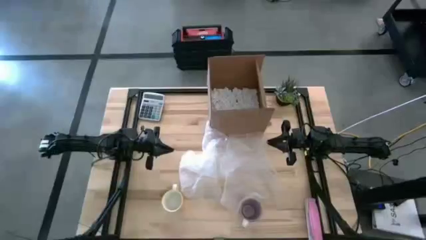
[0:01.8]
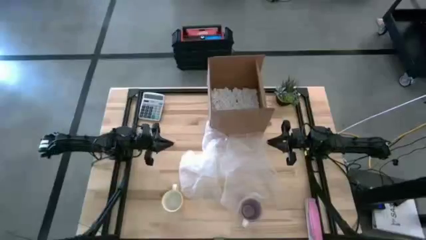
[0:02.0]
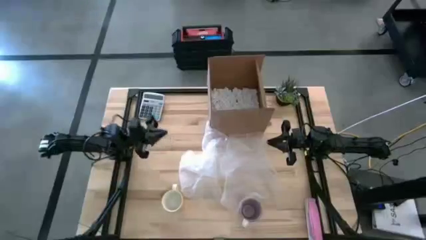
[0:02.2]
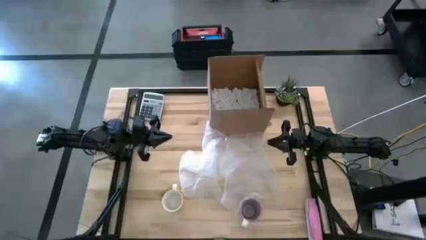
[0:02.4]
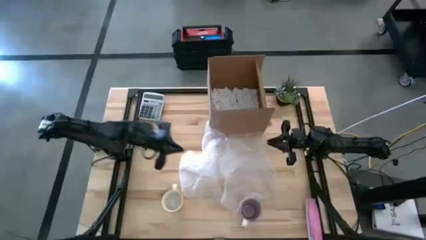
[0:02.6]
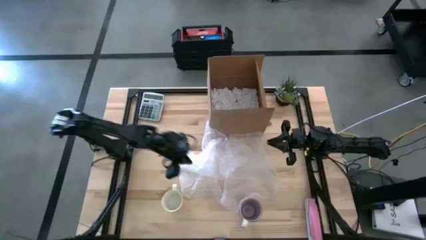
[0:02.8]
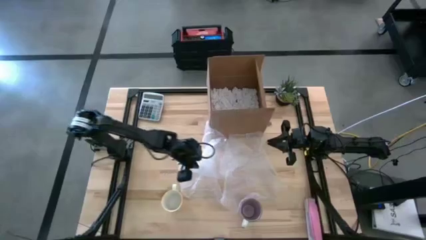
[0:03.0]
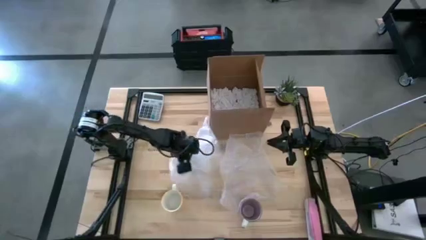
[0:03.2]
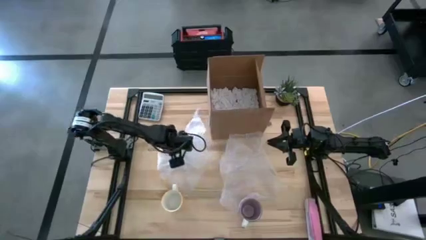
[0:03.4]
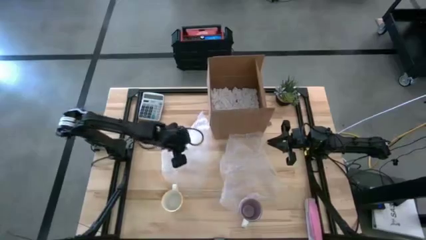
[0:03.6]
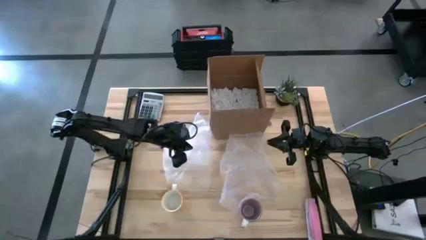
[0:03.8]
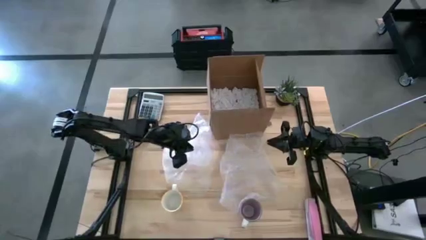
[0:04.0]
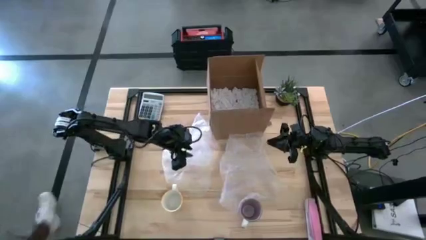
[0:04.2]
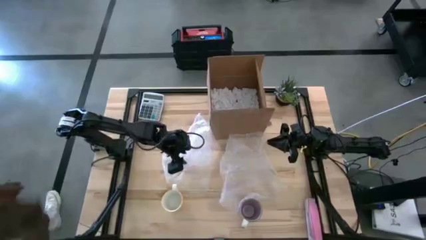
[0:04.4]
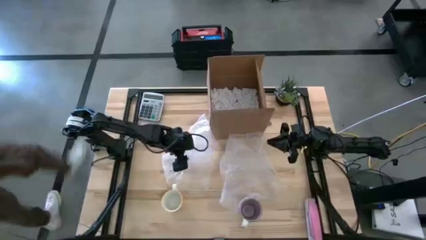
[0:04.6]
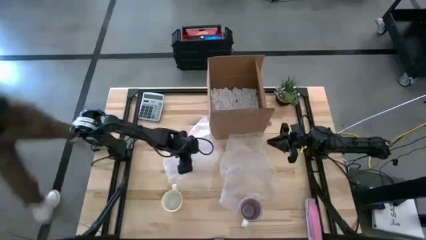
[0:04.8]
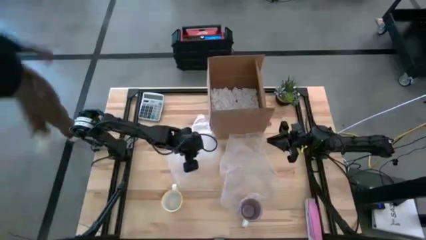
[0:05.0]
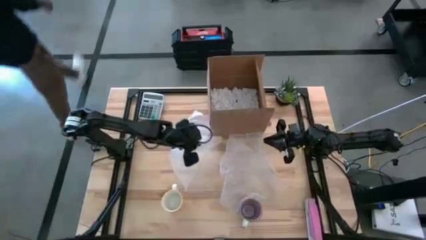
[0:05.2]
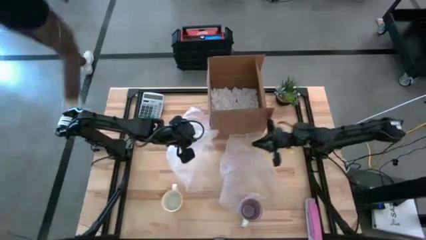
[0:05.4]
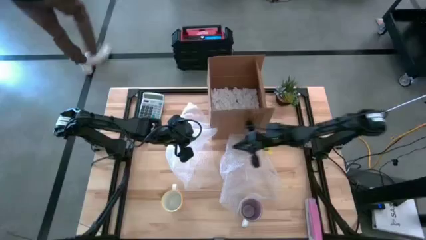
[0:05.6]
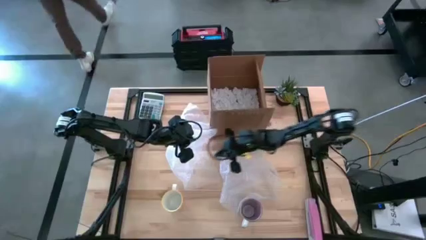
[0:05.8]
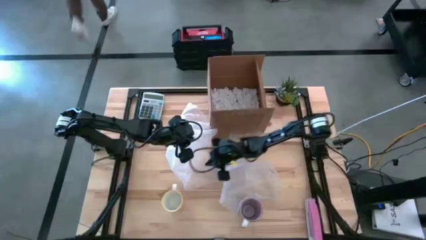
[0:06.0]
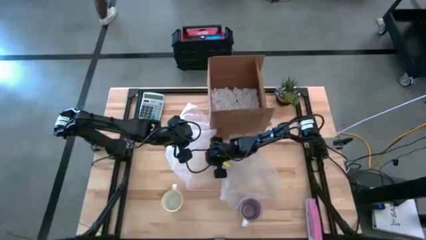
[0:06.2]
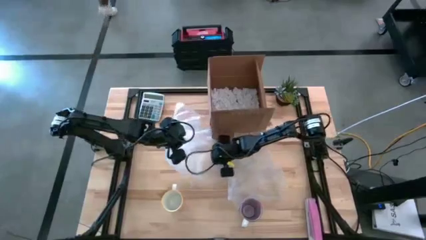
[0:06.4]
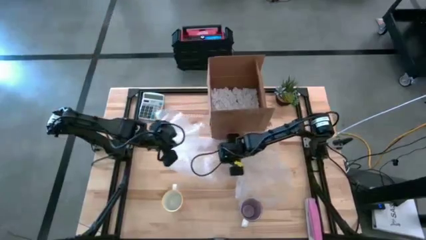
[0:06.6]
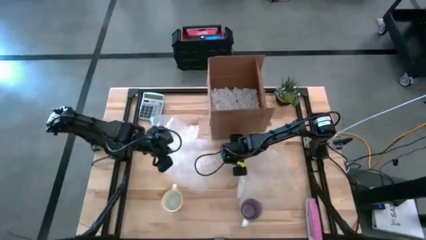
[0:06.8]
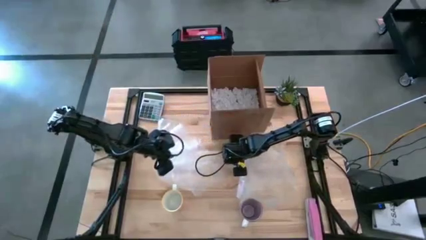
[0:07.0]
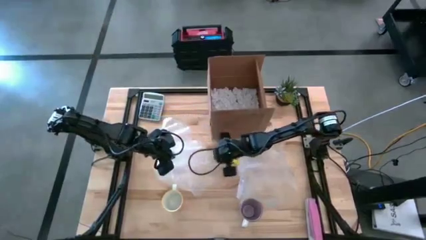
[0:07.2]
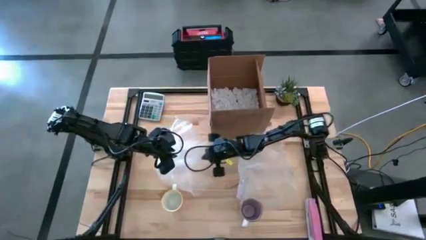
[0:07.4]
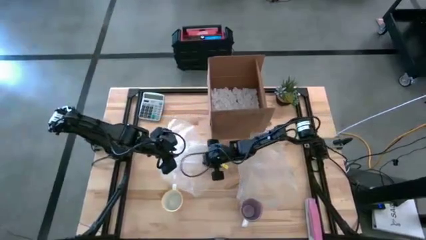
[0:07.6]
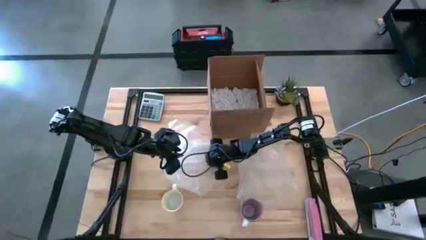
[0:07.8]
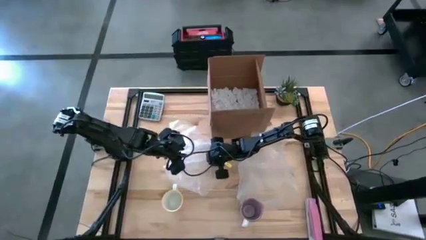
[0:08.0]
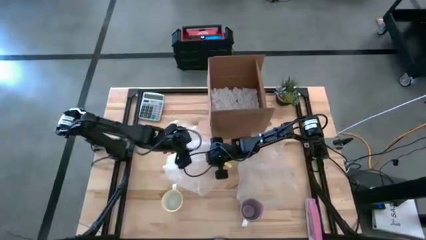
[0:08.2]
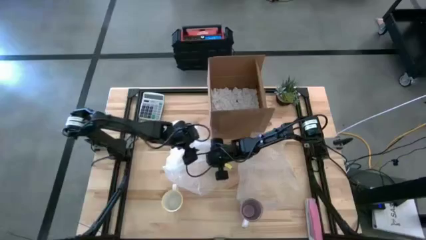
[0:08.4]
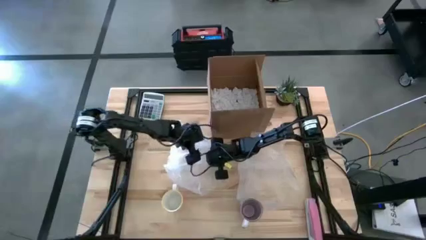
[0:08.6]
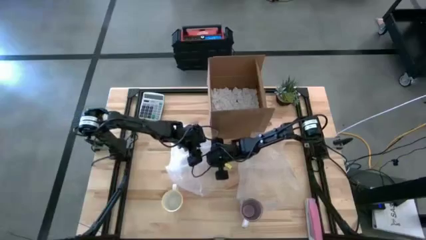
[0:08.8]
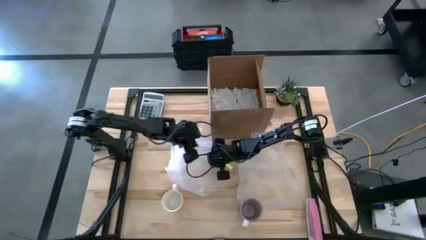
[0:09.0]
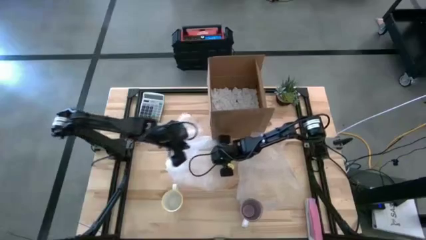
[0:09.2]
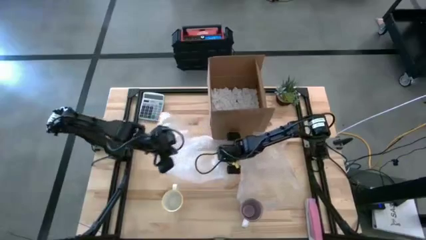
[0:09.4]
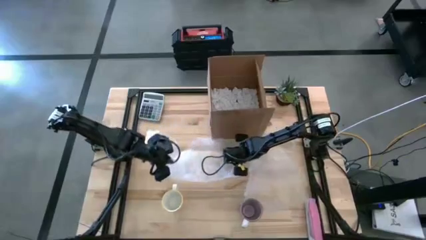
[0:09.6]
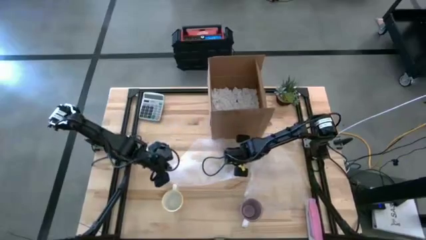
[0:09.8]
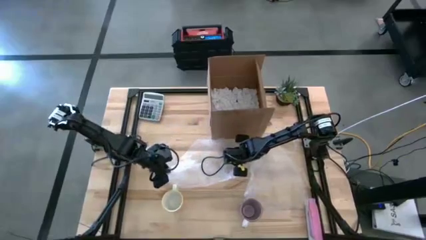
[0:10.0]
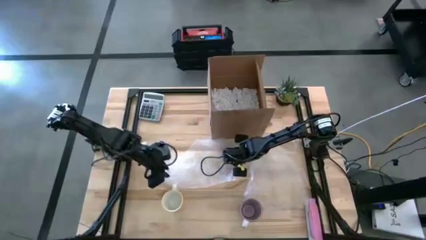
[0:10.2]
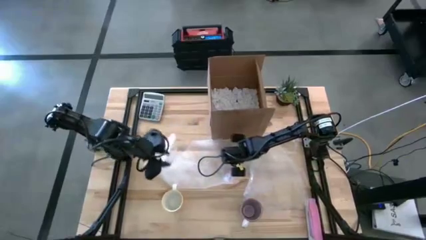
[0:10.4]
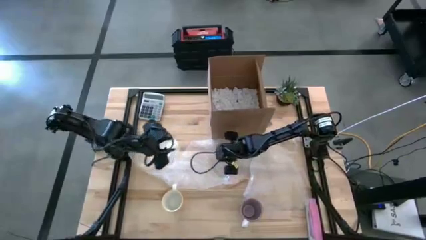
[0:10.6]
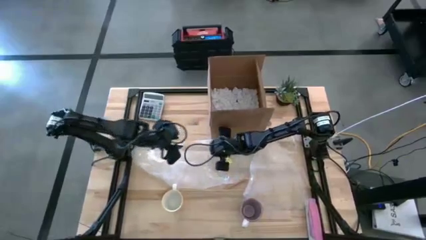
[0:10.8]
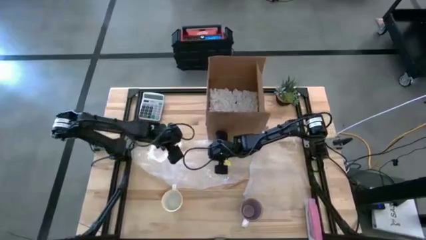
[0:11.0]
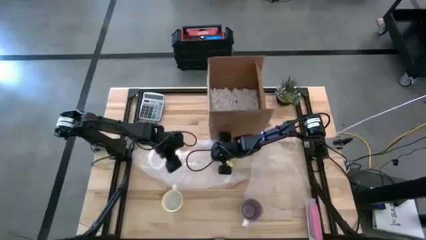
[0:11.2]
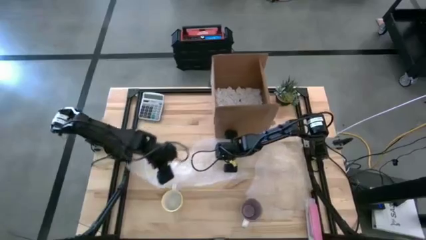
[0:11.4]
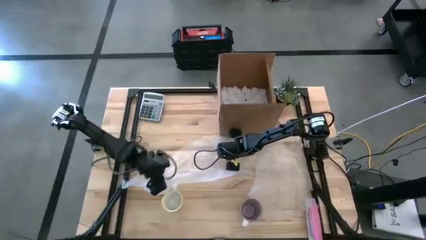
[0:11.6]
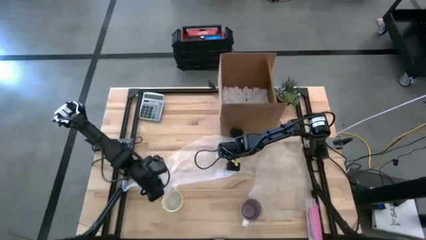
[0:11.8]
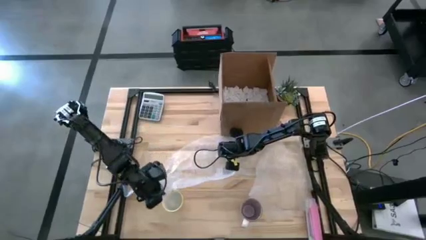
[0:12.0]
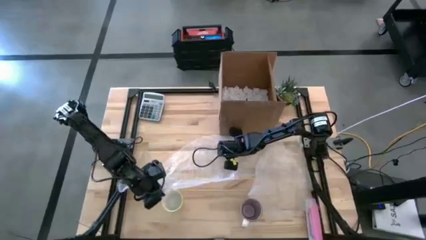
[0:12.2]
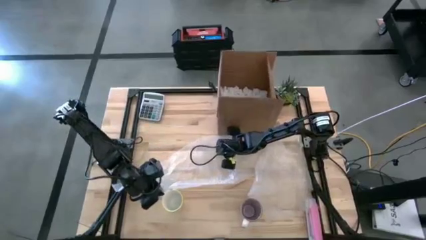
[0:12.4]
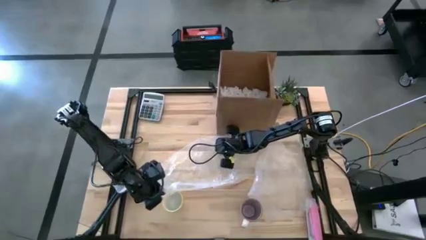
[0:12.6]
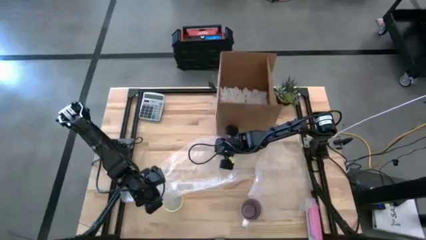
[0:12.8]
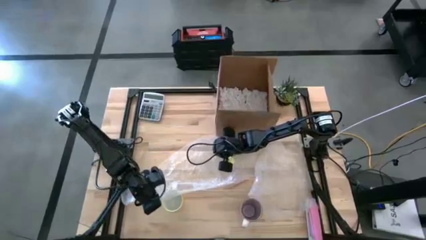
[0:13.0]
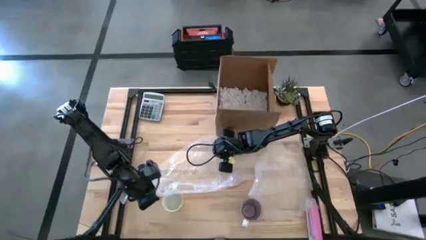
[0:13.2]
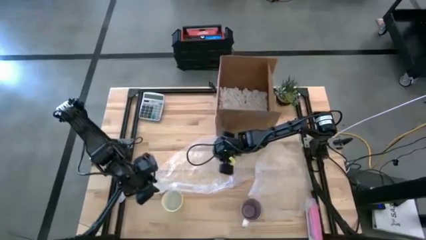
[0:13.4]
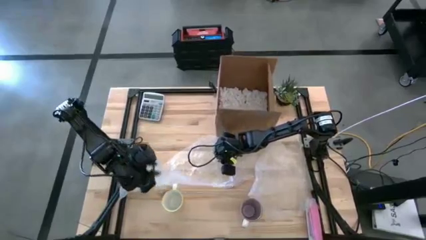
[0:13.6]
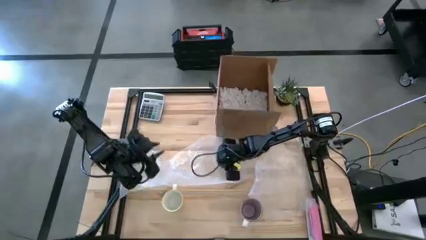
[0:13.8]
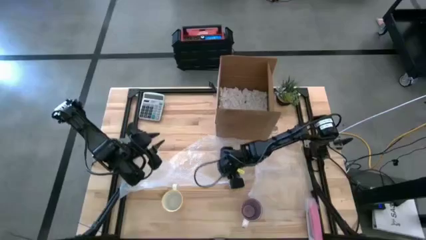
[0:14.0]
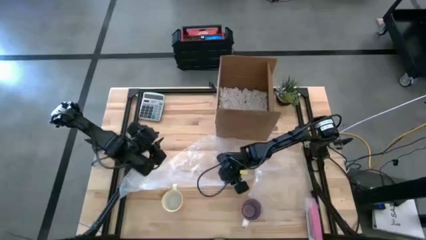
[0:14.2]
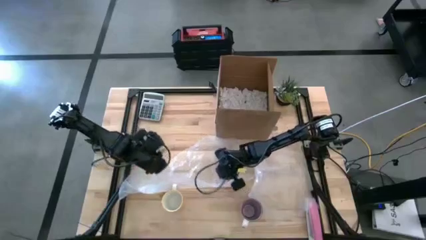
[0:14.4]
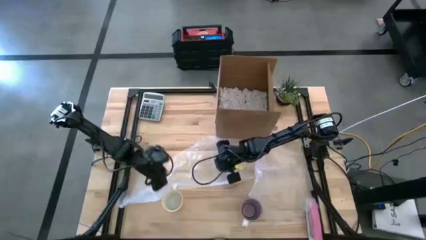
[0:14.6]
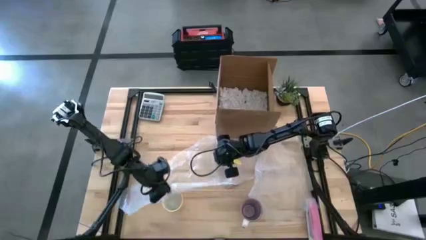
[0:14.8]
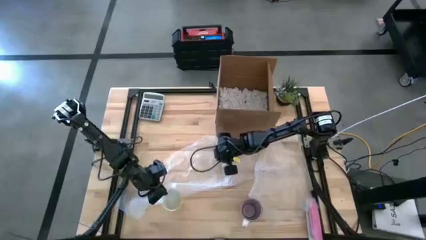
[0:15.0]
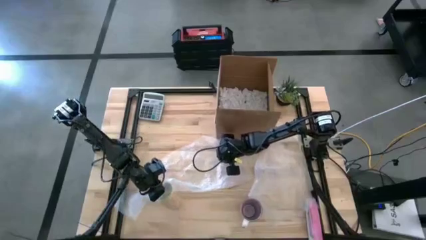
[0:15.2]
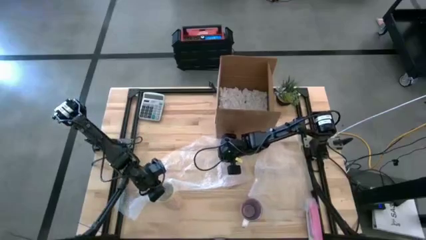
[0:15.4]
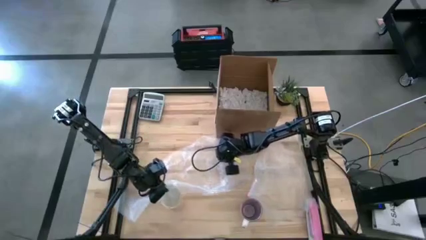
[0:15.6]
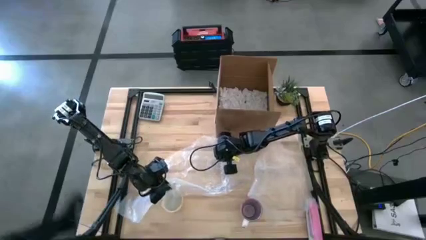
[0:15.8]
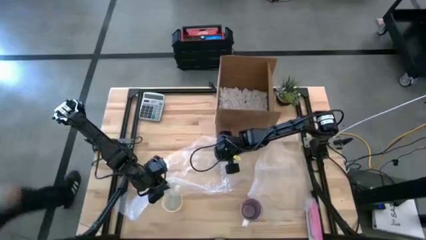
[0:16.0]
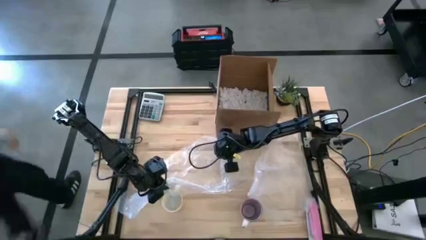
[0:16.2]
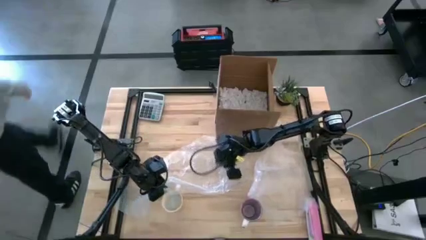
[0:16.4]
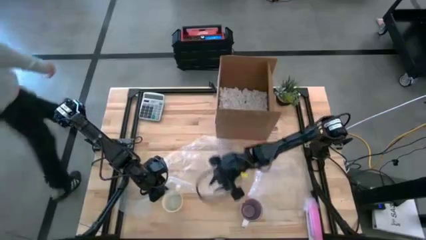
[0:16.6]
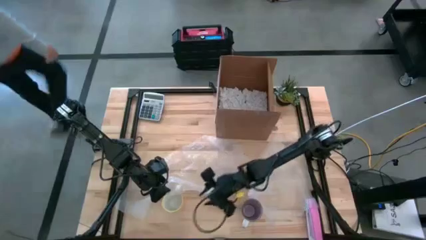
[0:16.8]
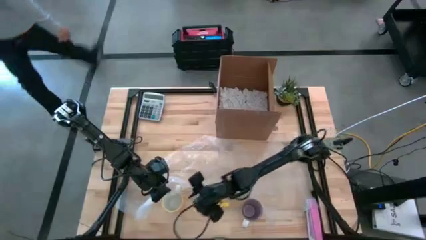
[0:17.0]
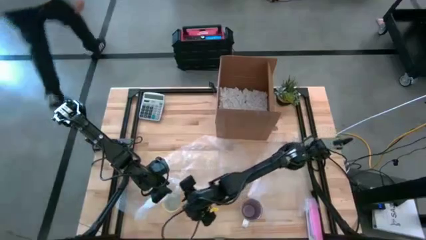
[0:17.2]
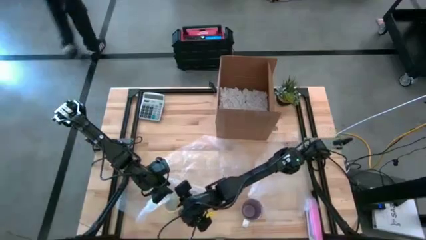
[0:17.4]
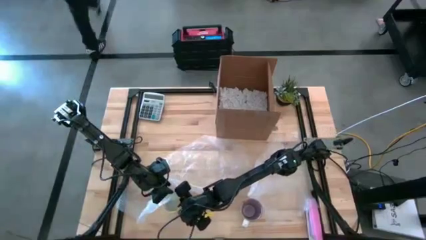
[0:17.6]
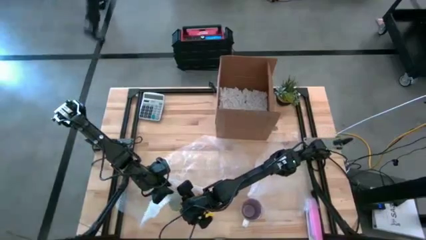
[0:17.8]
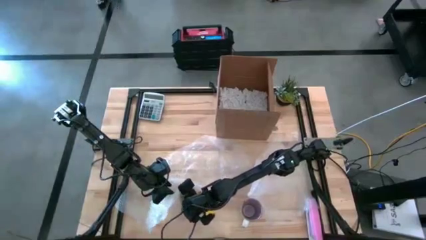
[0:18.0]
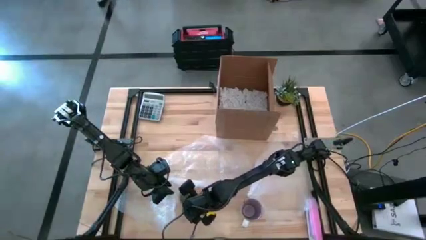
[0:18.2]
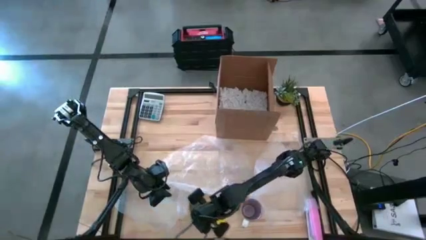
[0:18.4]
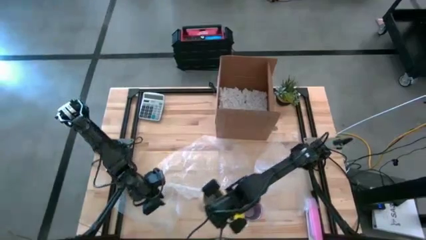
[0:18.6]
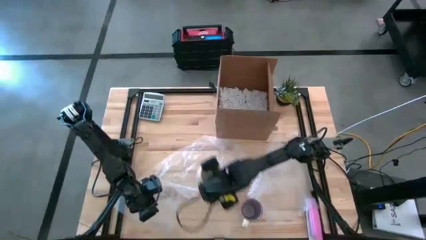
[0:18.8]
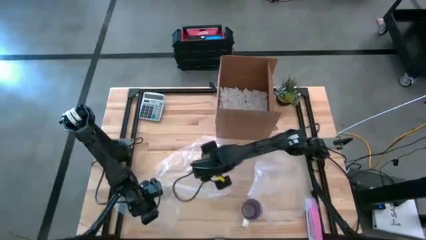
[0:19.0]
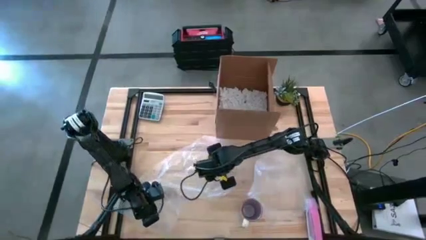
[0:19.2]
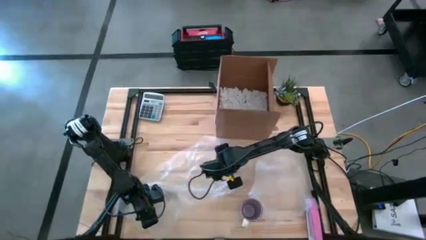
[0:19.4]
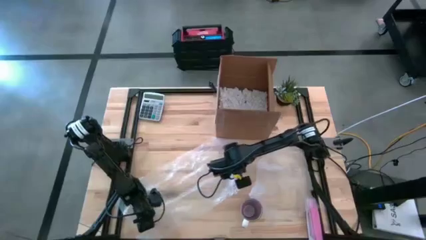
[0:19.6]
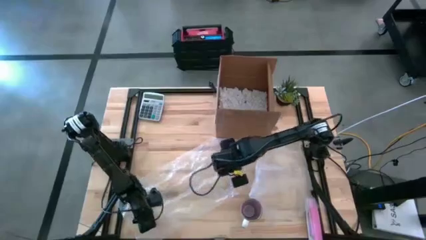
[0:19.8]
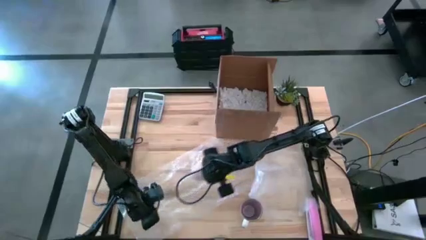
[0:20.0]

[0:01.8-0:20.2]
Task: wrap mug
Wrap the orange patterned mug with the left transparent bubble wrap
